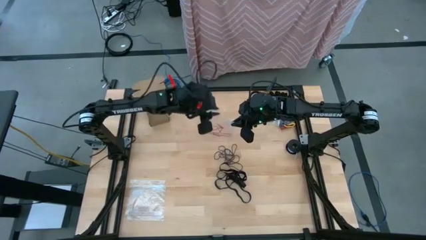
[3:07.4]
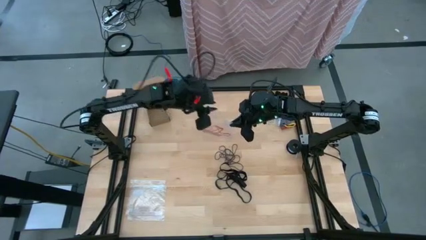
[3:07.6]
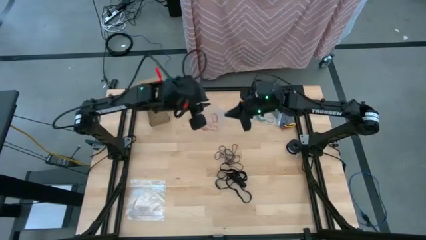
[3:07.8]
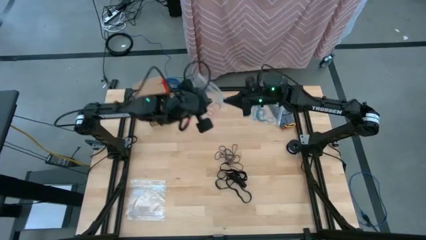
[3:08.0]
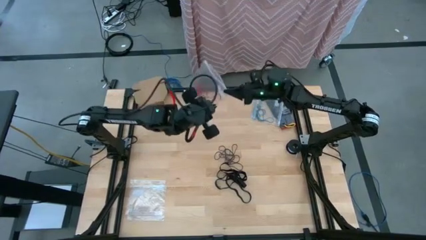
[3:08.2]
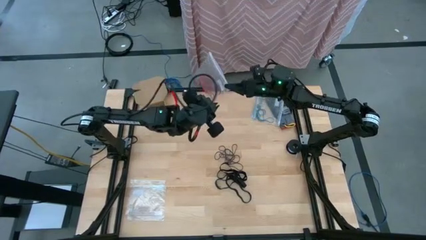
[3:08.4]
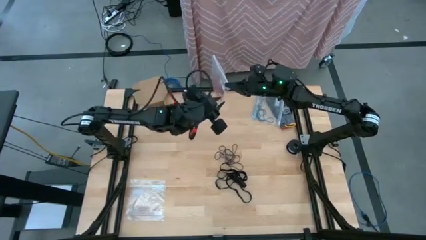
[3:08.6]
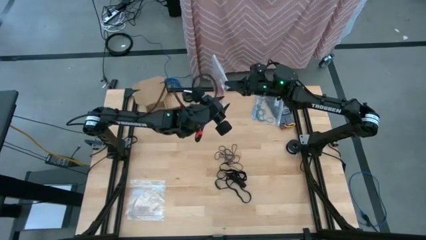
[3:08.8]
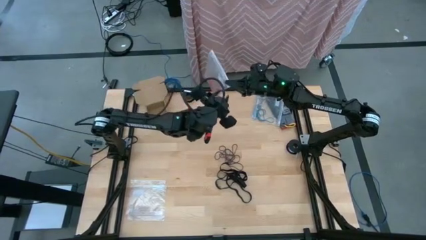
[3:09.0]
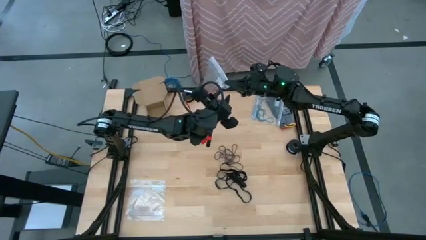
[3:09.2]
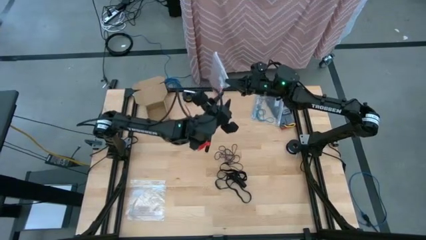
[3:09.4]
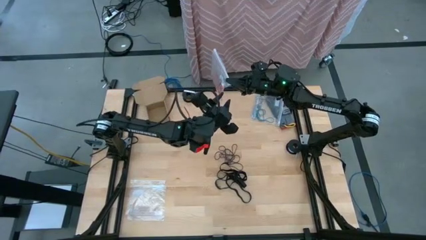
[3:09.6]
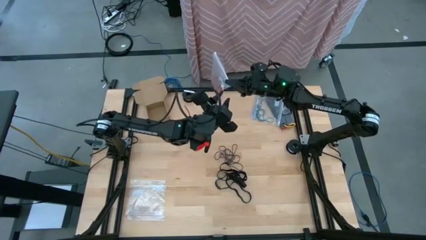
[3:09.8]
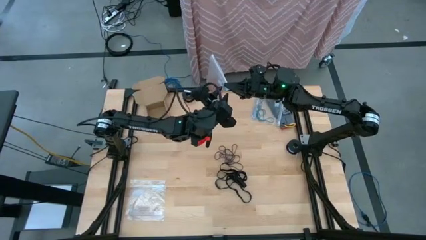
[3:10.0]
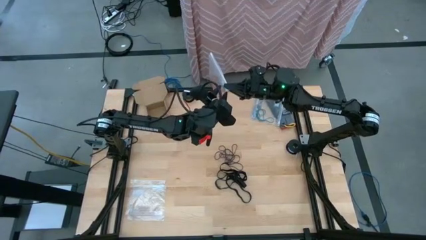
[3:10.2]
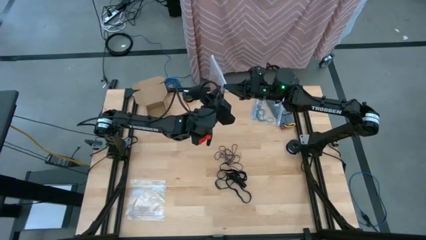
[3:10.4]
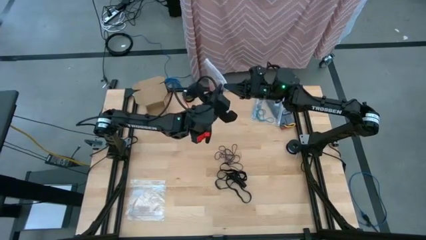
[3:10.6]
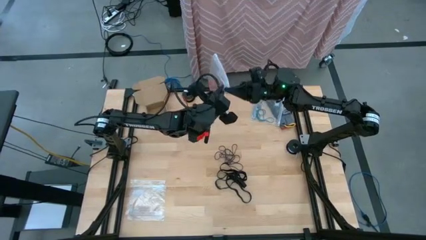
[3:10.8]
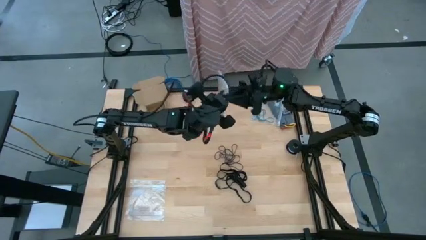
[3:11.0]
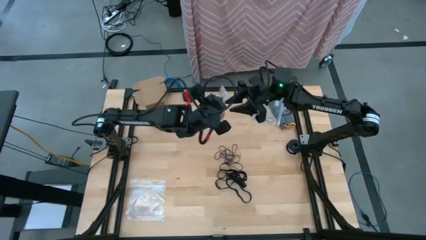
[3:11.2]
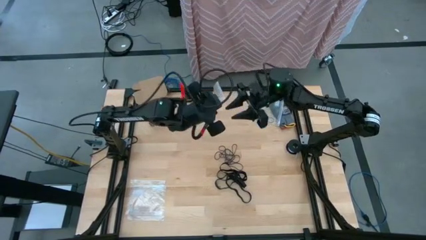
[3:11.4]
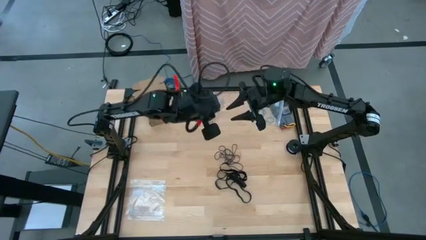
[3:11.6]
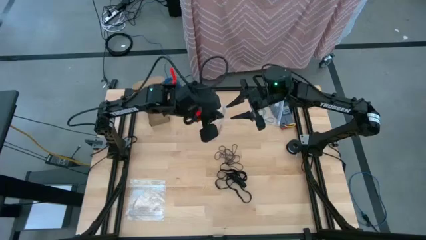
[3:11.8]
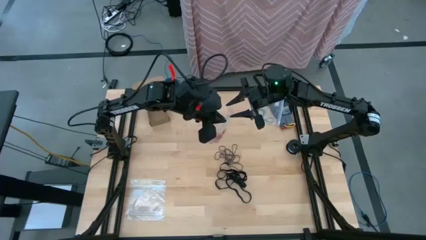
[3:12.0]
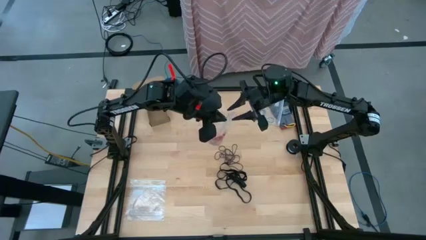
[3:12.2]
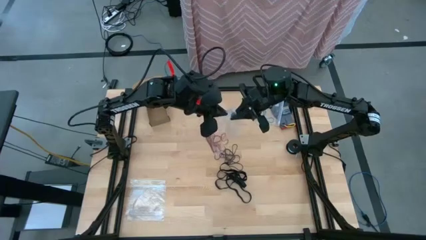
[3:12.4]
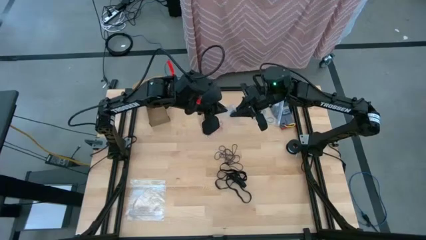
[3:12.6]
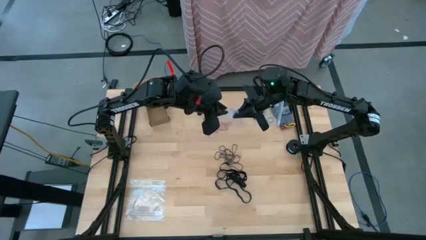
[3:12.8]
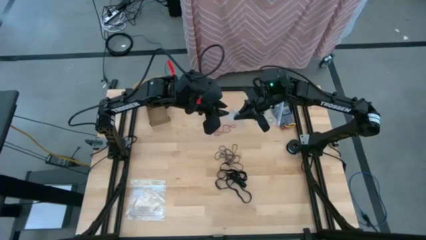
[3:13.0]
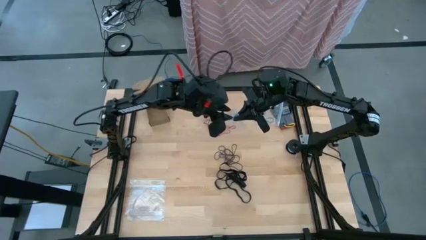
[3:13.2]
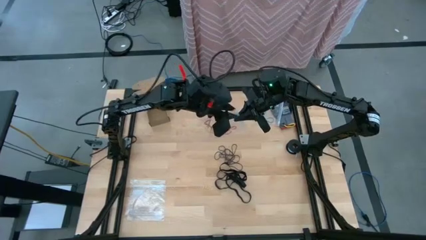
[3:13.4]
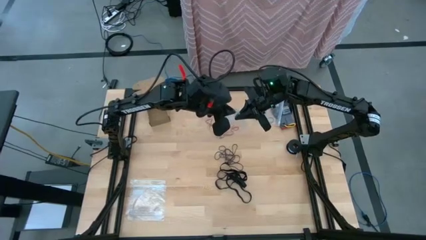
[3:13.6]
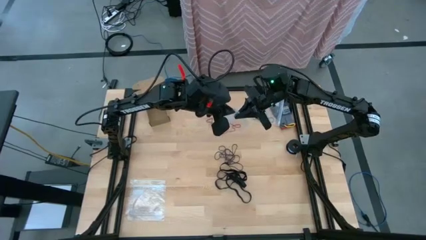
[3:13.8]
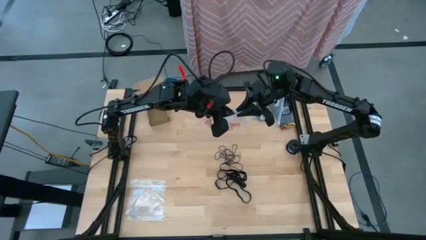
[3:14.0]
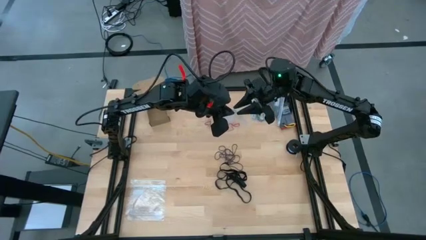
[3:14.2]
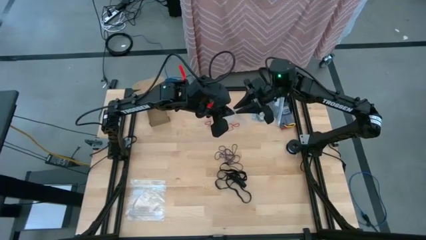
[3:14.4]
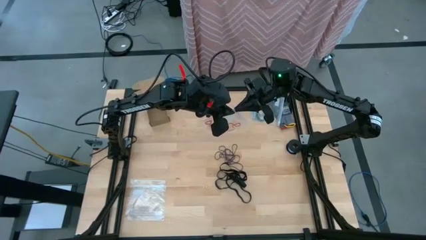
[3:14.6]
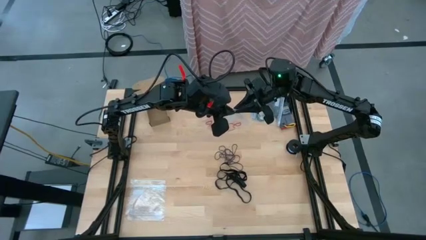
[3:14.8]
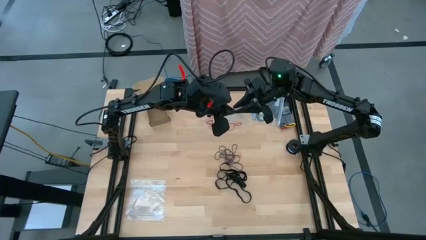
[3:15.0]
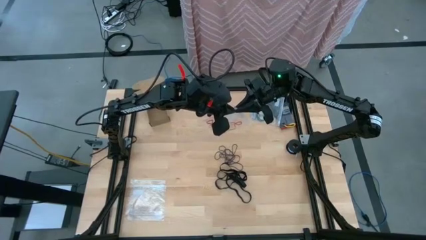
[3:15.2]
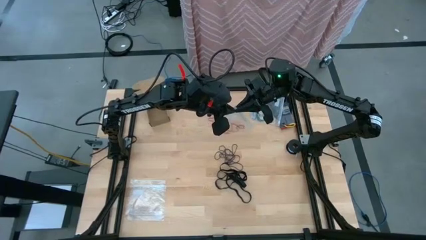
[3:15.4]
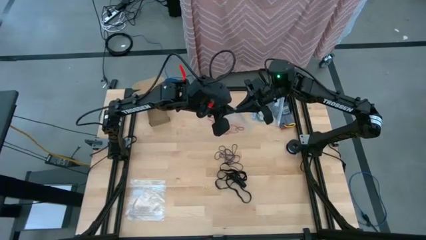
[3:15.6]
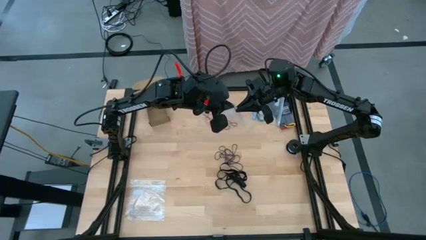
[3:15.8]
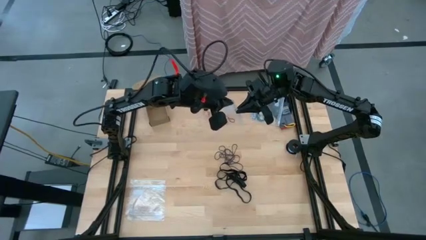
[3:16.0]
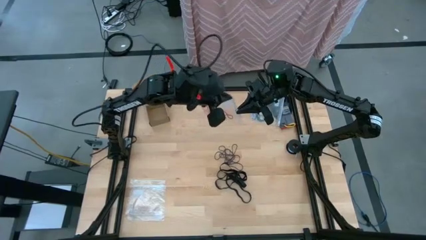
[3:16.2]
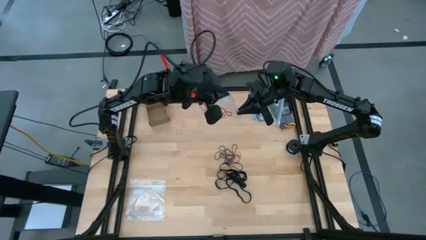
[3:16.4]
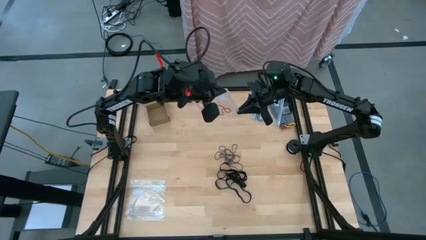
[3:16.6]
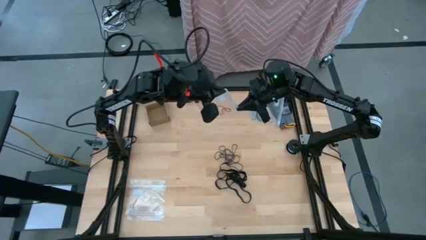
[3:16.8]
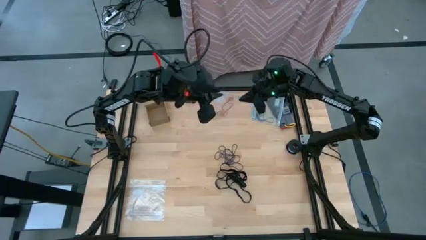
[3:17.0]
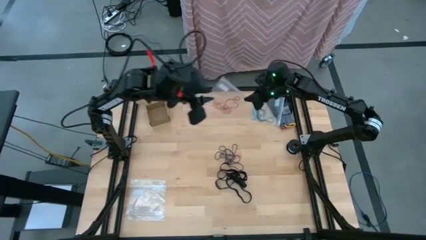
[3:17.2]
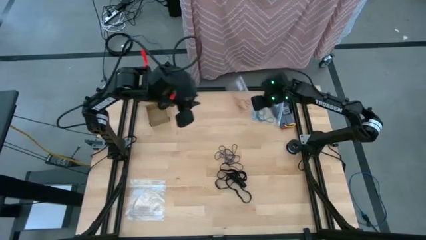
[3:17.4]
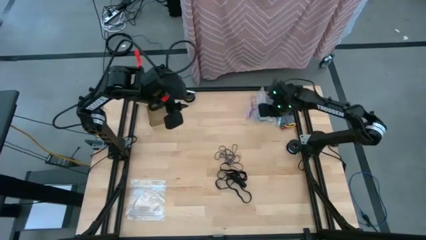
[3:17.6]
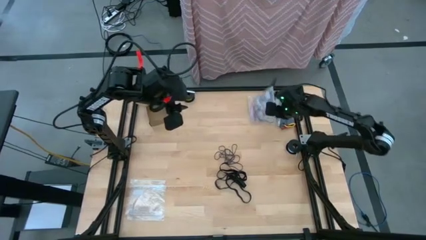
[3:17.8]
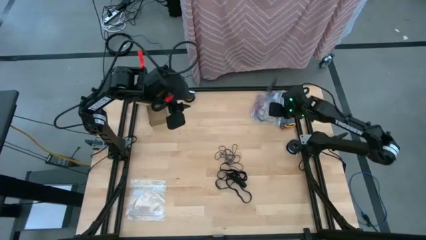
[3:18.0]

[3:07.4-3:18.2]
Task: Sort rubber bands
Close the transparent zip bag

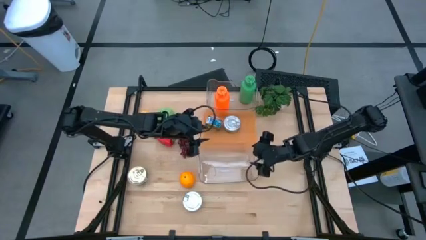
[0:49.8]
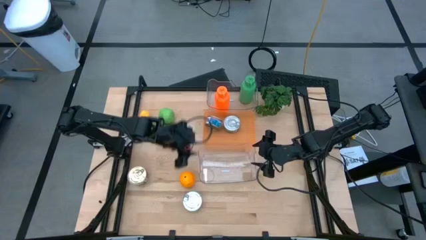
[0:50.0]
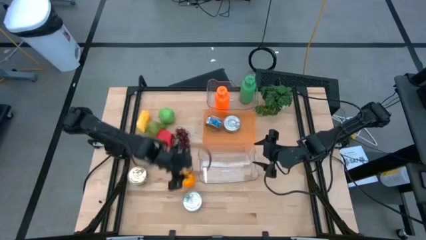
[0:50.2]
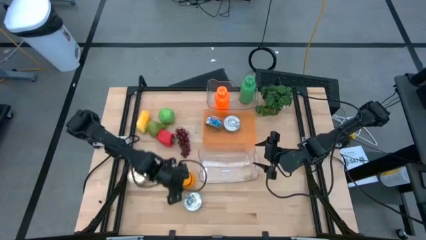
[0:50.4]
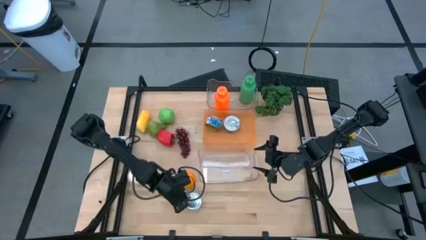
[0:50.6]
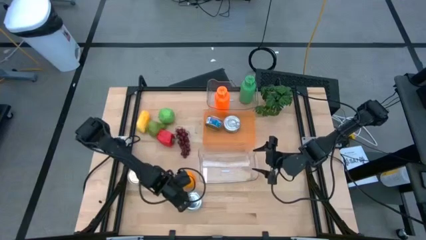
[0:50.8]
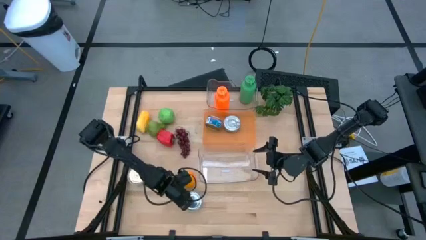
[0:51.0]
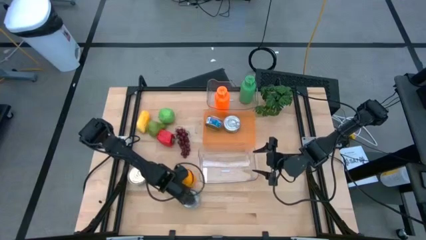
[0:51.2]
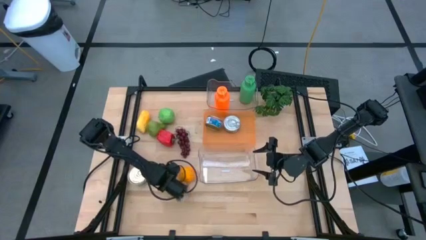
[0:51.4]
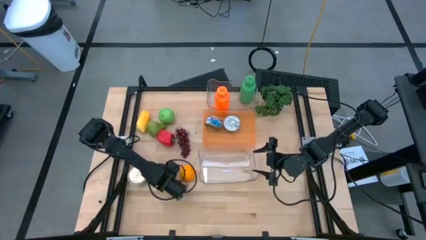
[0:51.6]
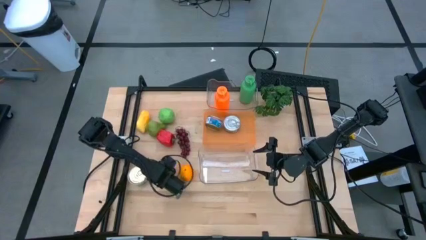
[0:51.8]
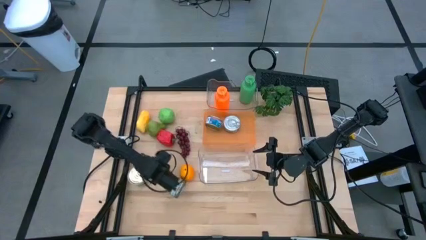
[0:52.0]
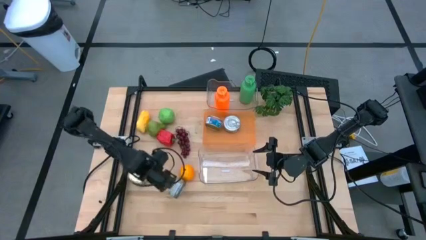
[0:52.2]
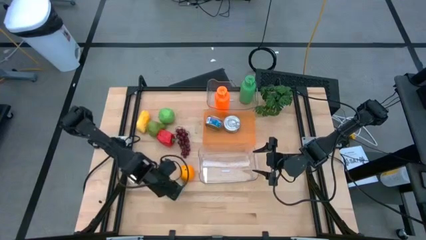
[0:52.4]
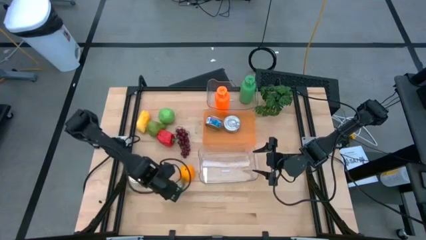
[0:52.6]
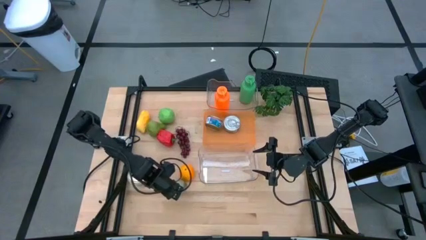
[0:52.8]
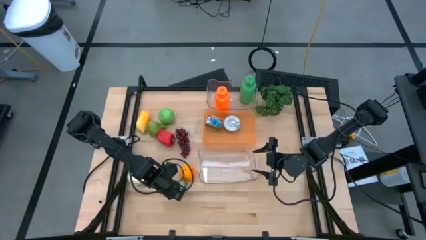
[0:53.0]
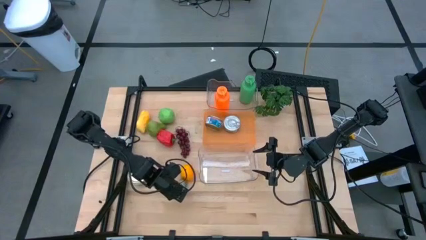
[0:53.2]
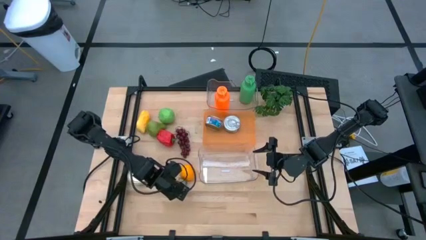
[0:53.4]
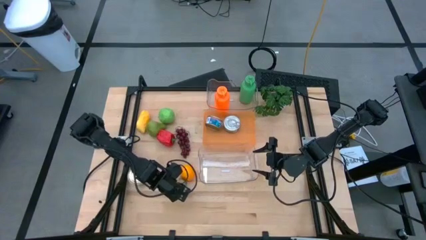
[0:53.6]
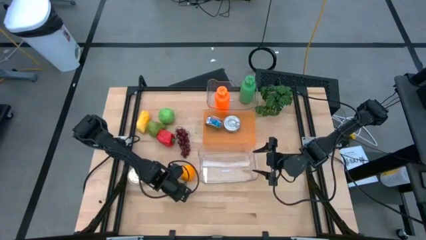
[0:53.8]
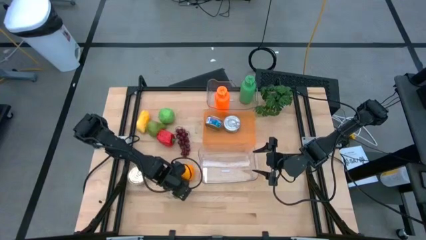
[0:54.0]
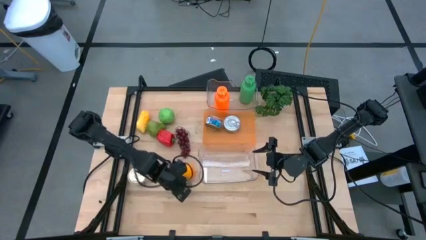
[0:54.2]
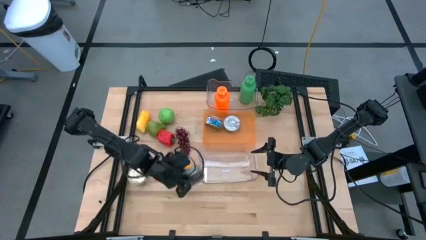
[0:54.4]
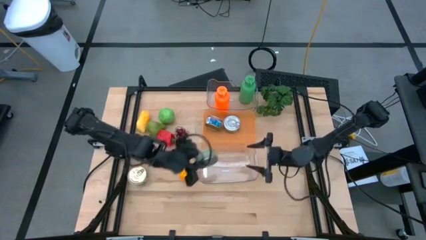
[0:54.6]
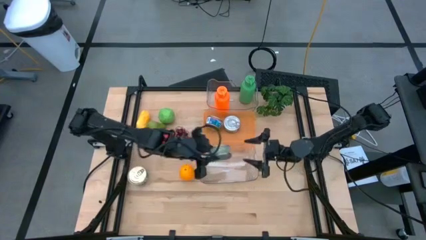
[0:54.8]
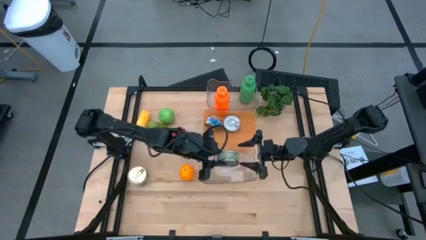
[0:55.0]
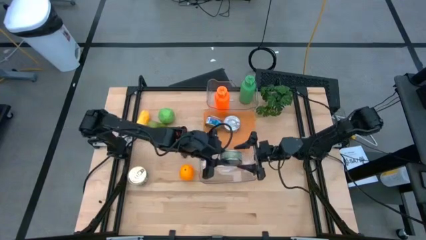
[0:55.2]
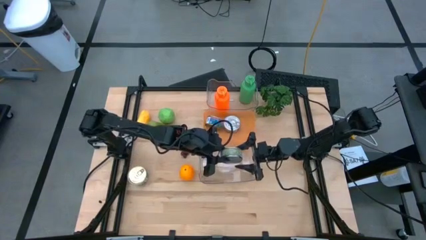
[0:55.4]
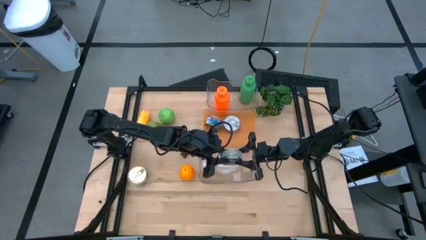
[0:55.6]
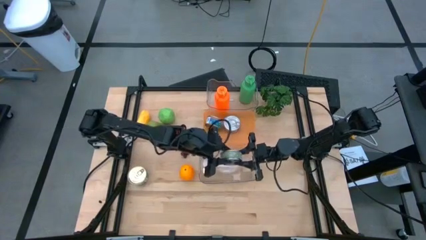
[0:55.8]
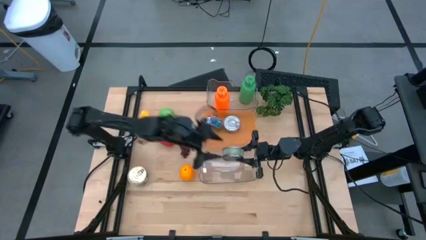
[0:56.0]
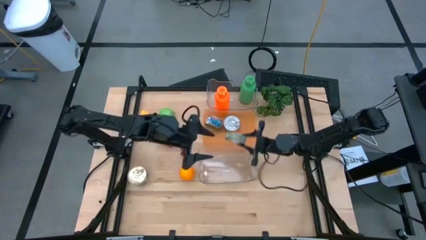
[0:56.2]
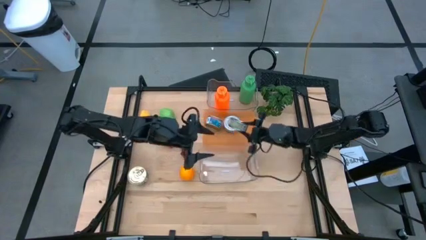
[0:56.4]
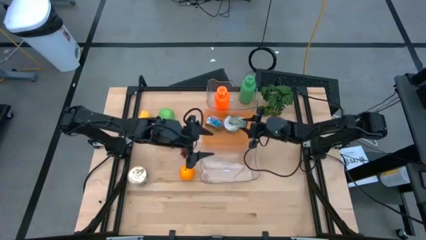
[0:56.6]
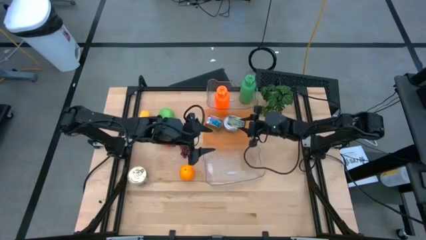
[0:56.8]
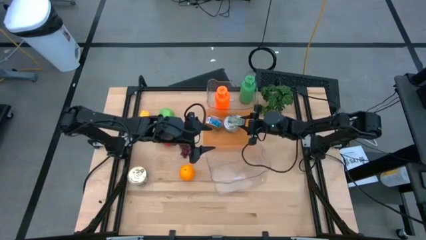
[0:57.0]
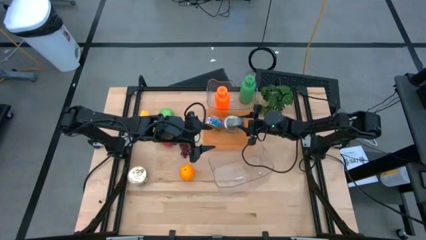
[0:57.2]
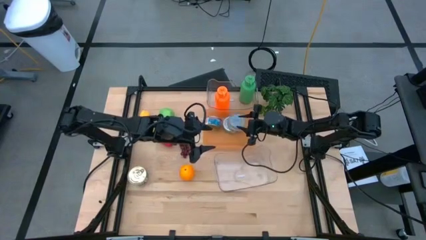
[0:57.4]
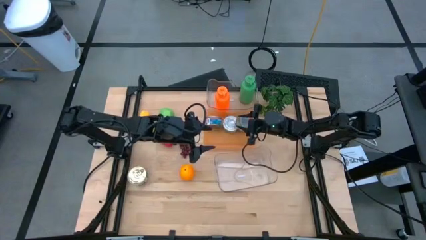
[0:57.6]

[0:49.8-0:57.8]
Task: Pick & Place Food Item
Put the green tuna can into the orange bin
